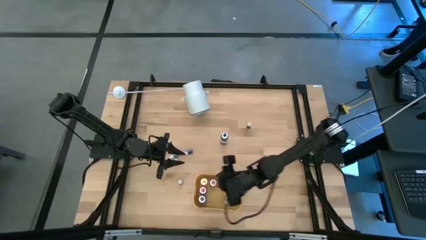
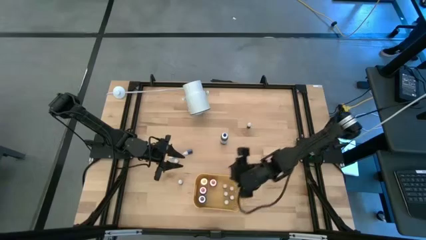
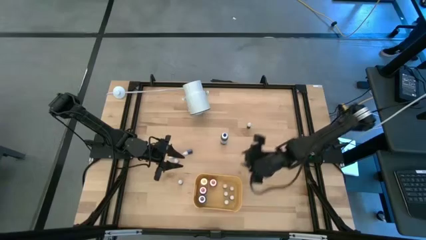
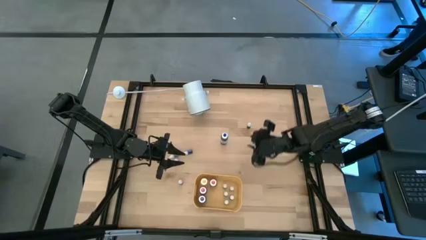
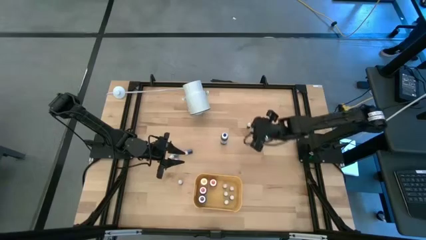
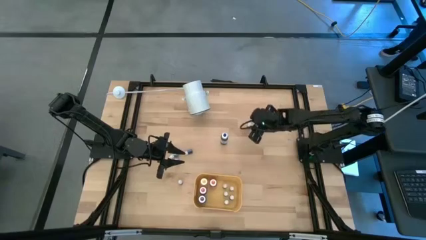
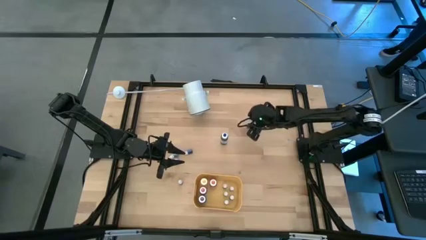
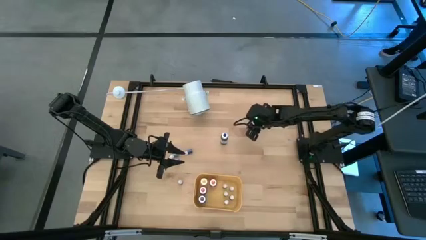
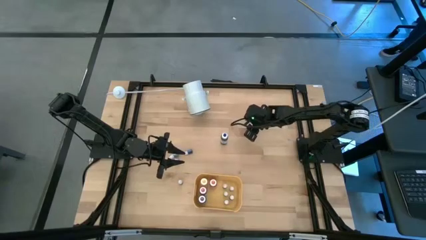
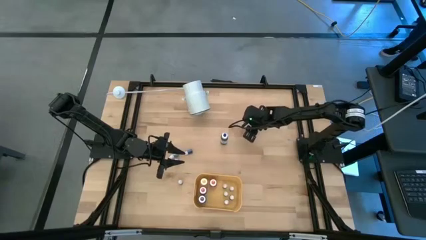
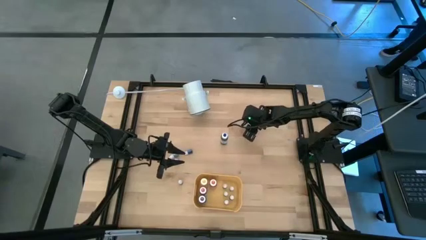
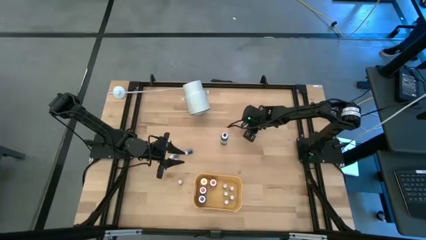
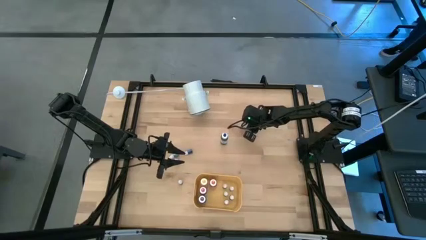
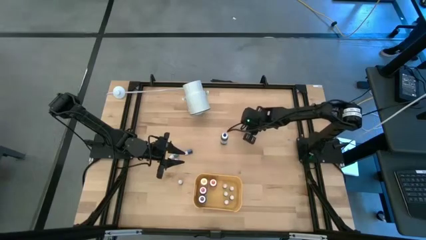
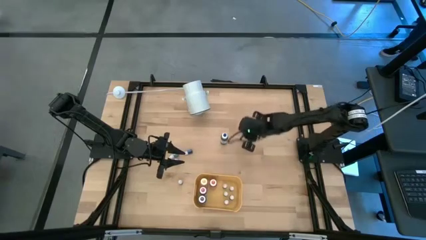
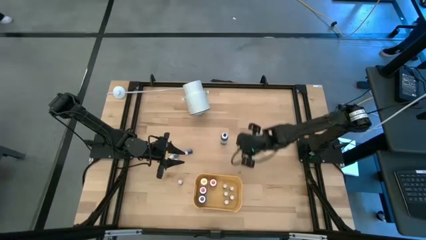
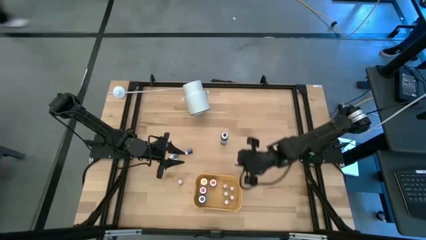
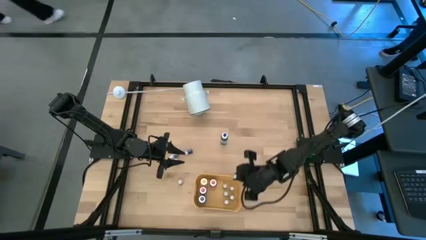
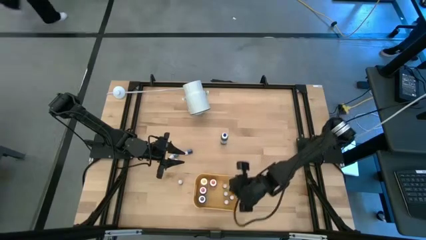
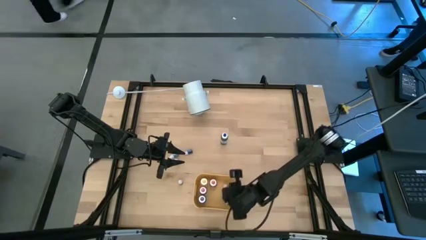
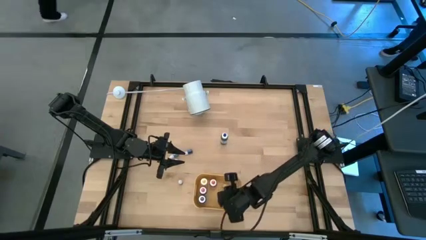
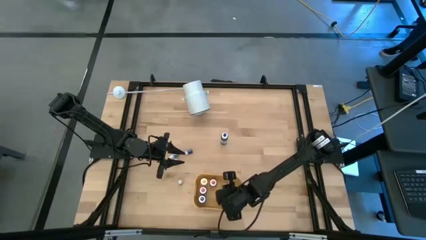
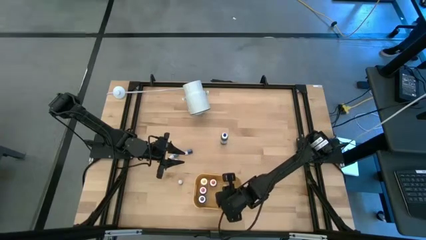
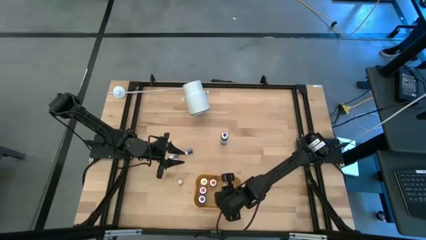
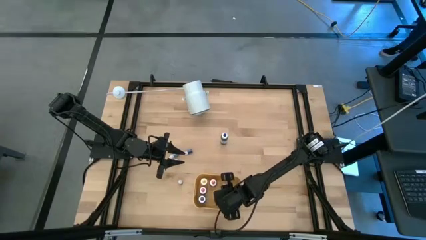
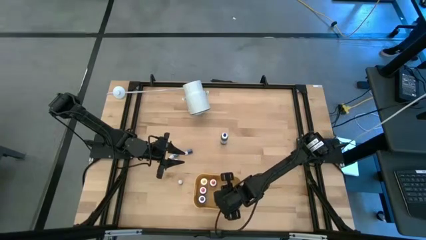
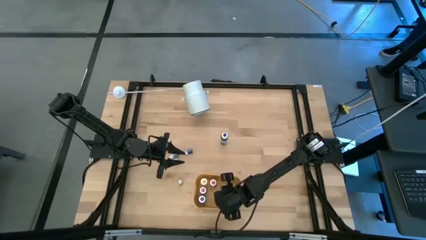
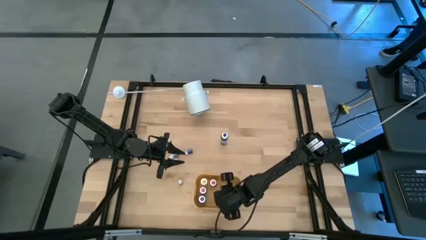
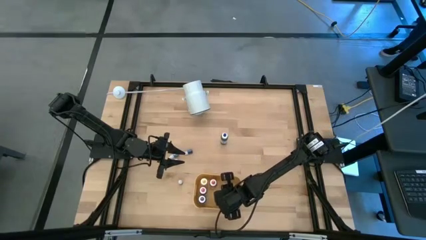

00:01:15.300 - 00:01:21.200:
Task: Pick & Place food coloring
Put the small green food coloring bottle into the yellow bin

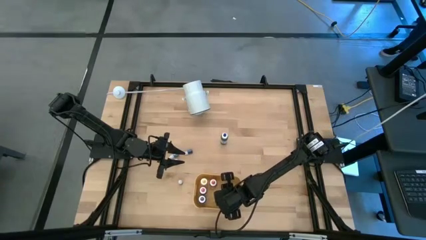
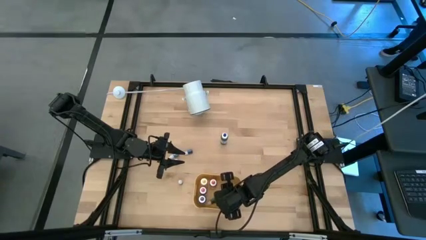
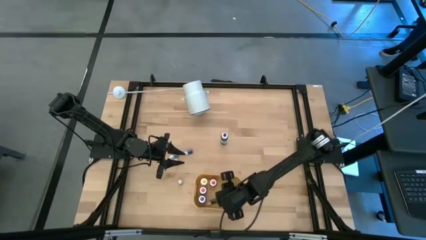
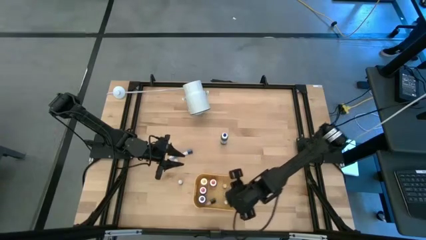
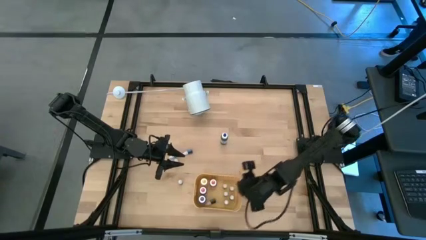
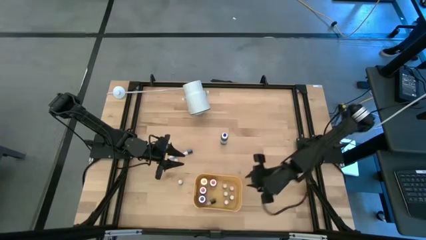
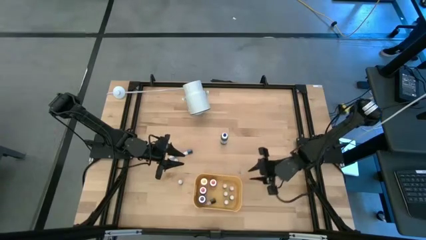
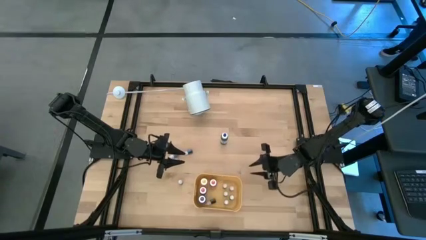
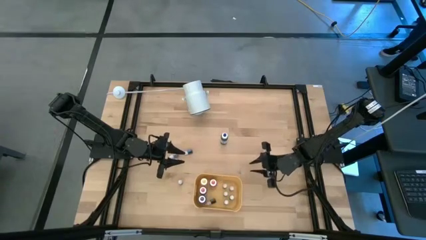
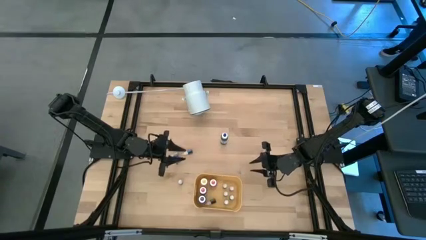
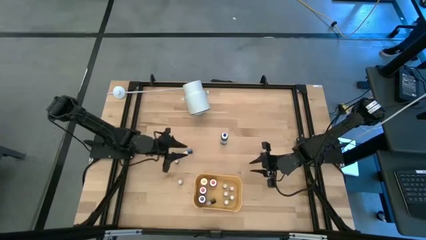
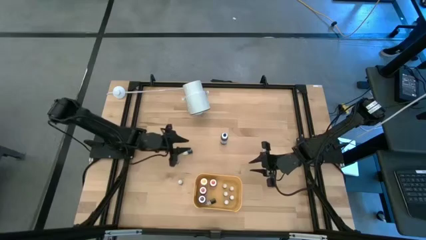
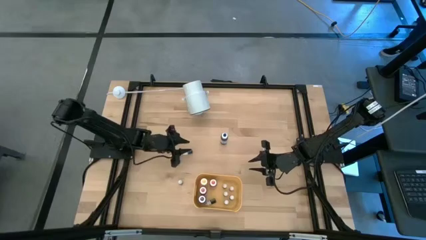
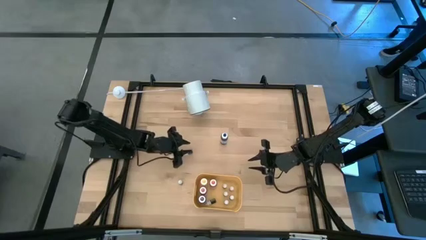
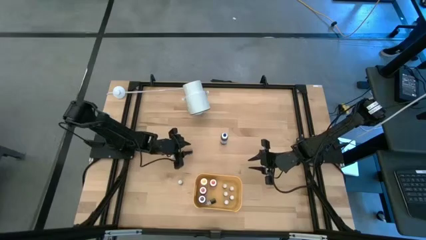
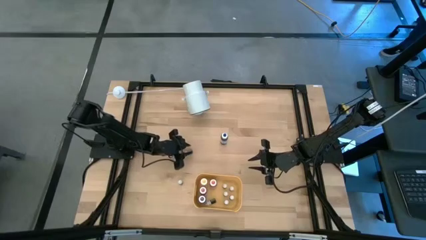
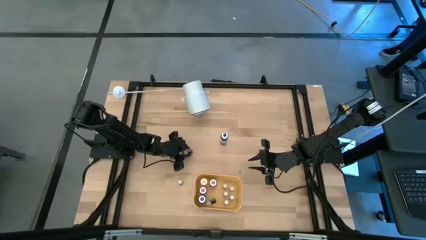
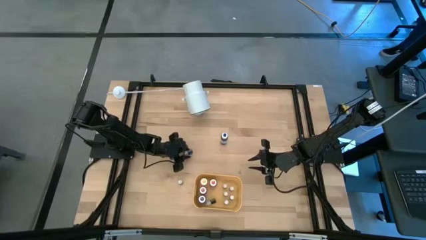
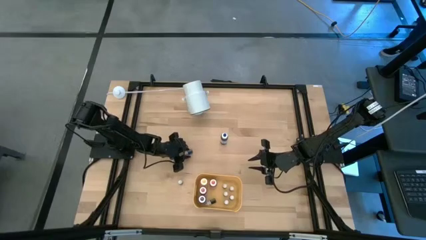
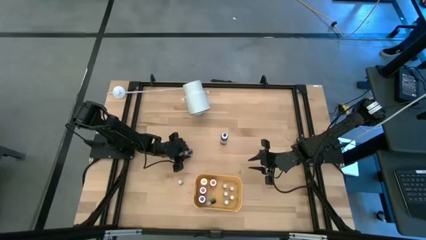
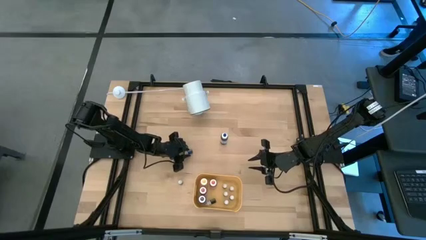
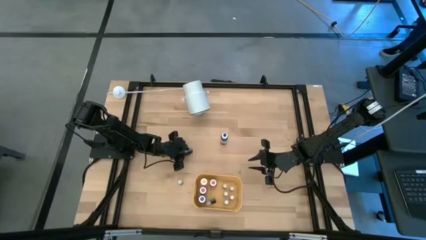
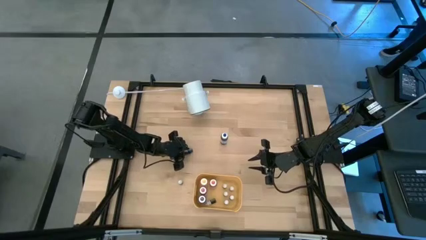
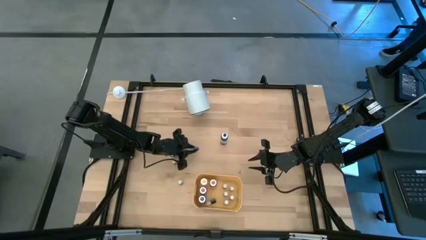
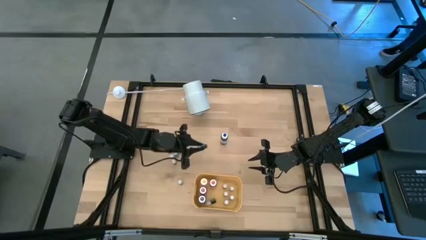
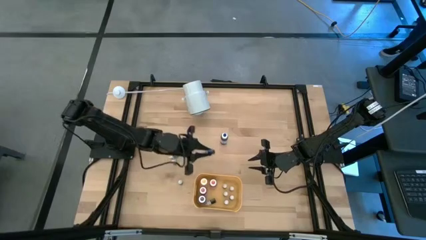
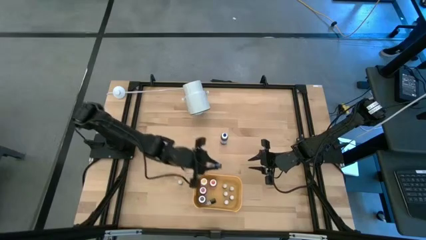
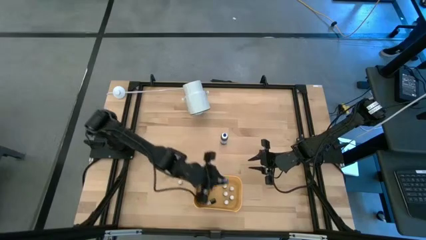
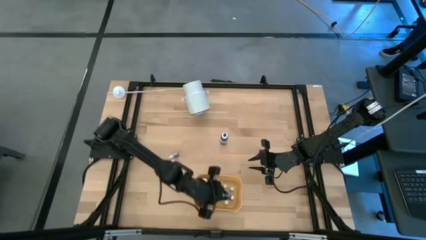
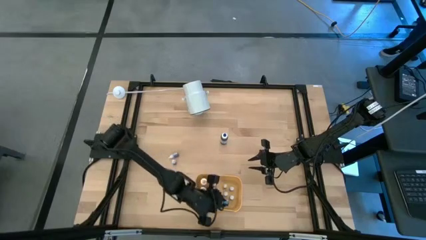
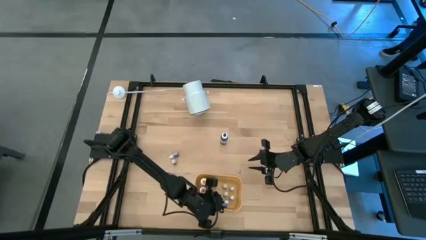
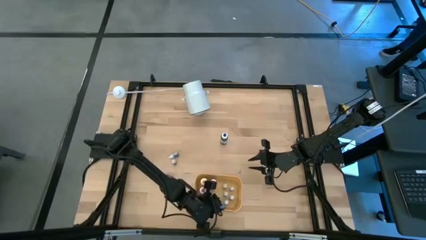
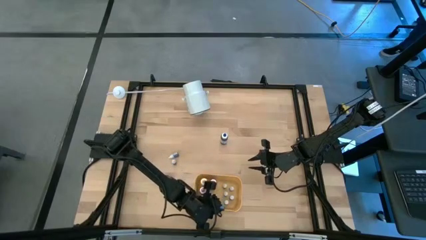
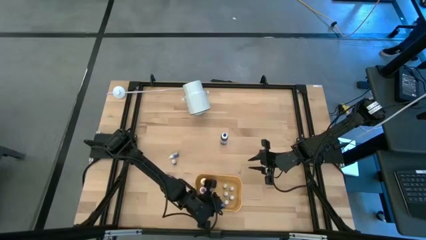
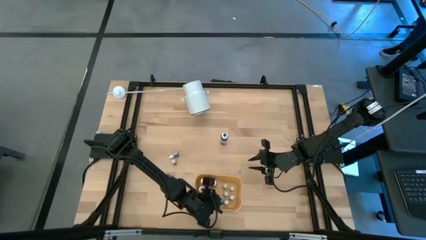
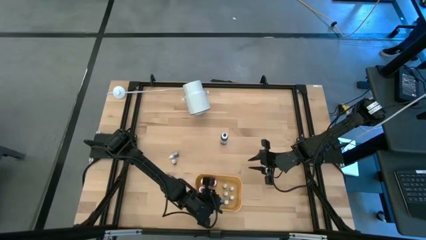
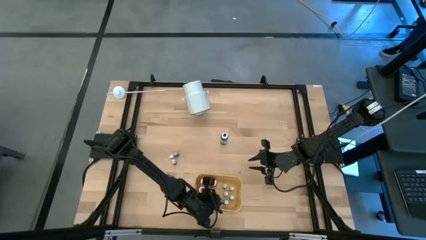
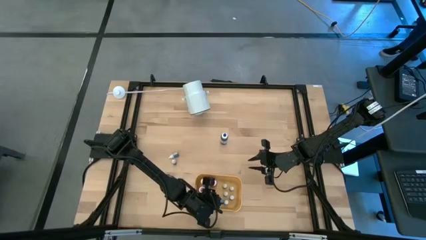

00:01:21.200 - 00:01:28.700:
Put the right small blue food coloring bottle into the yellow bin

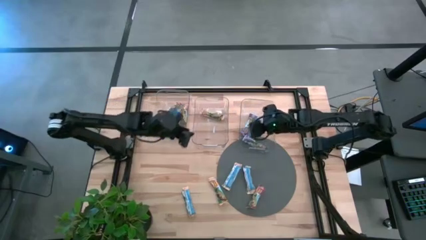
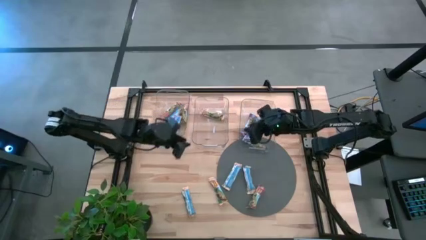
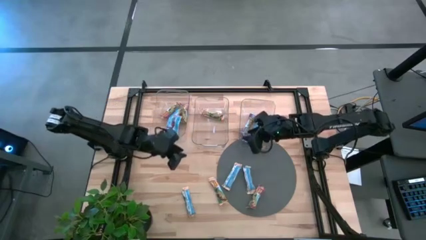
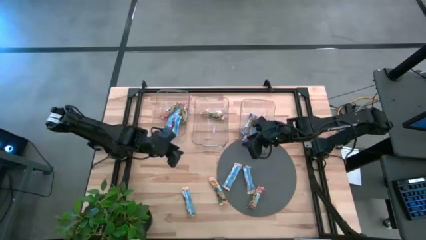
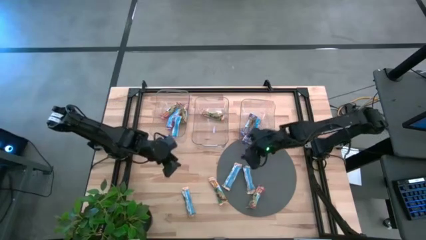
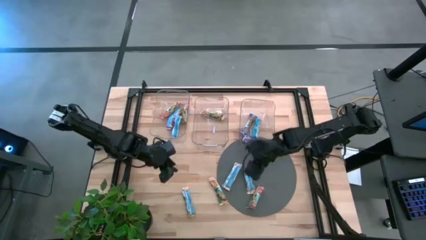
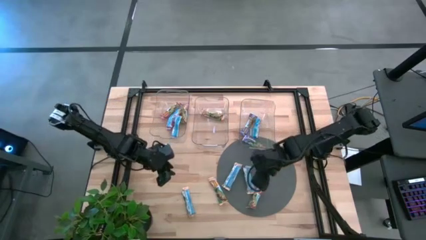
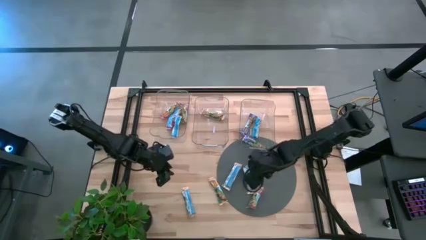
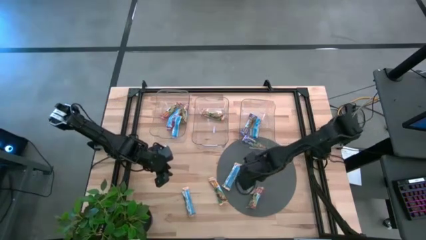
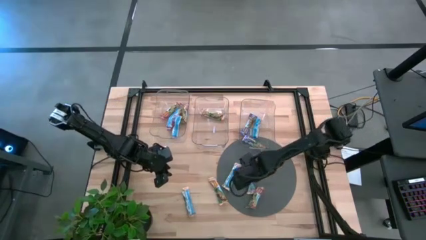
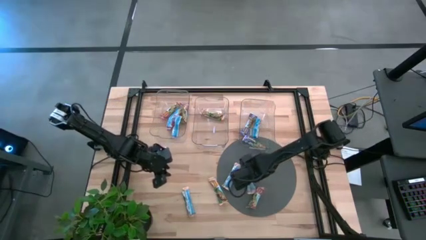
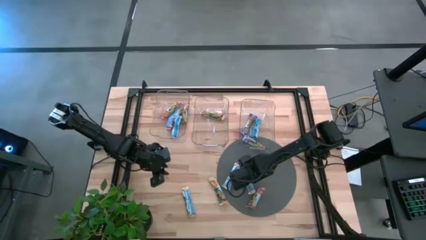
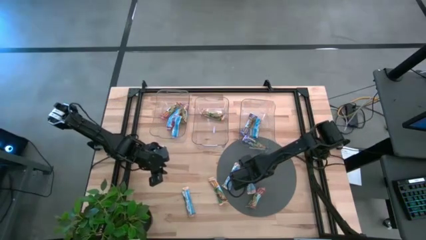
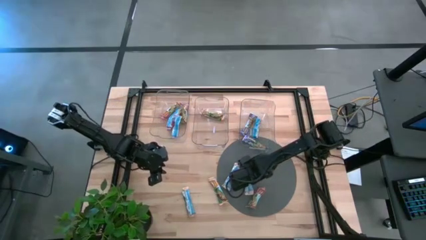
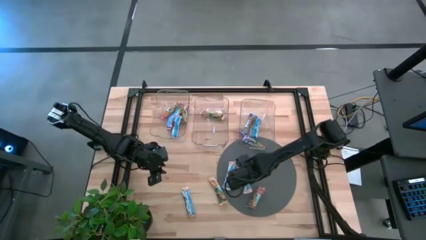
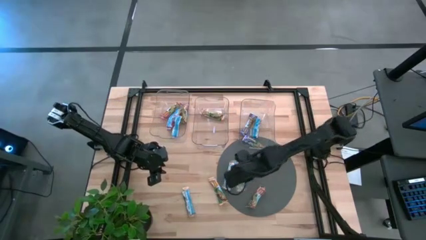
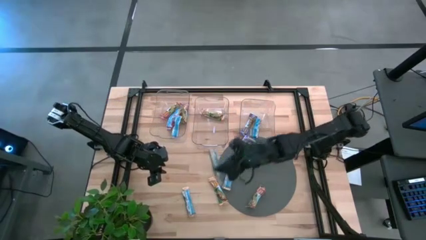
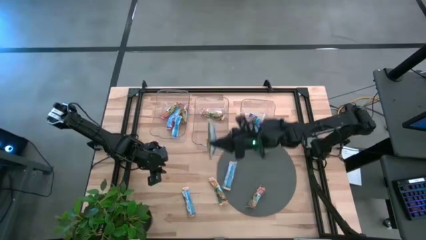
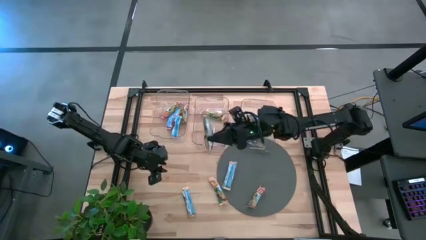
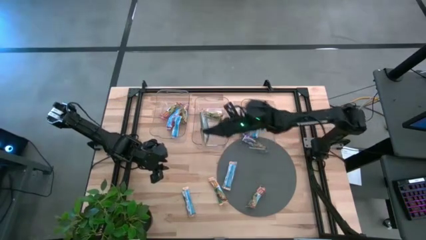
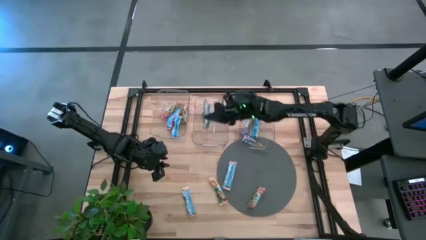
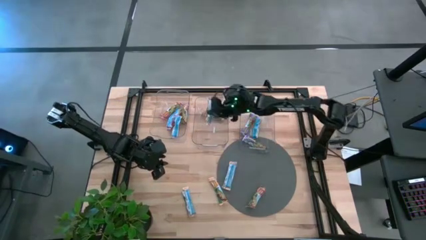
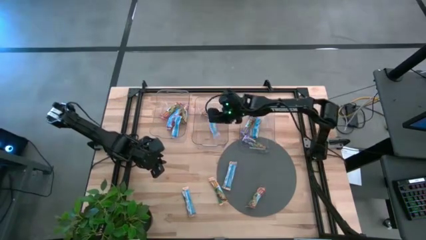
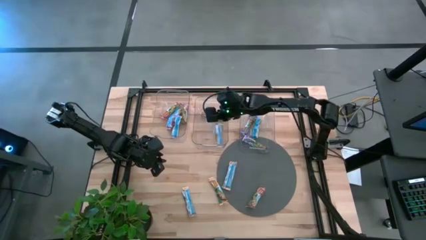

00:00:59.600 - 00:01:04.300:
Task: Pick and place Granola Bars by type
Put the orange snack bar into the middle transparent bin
